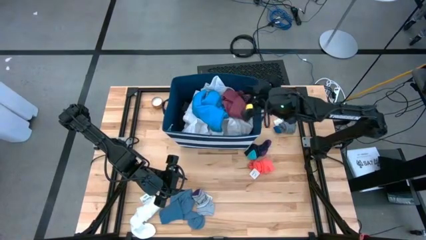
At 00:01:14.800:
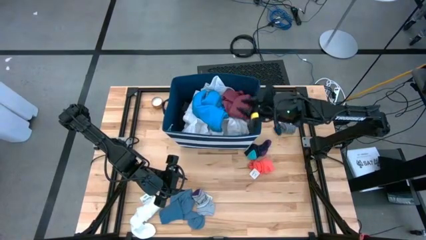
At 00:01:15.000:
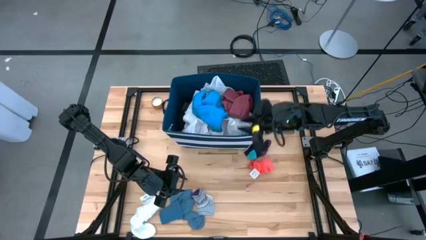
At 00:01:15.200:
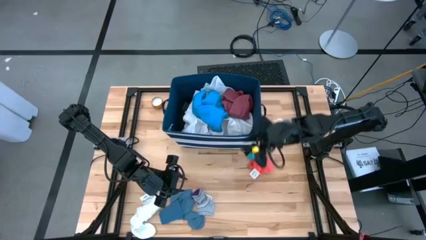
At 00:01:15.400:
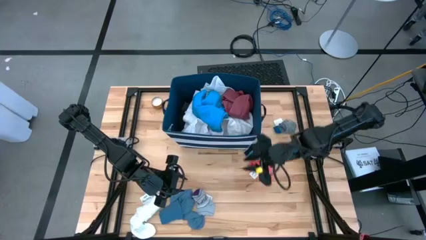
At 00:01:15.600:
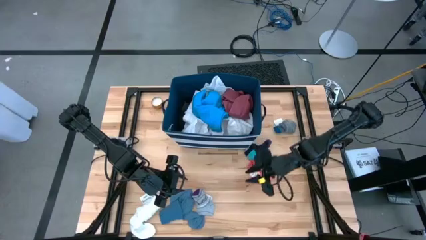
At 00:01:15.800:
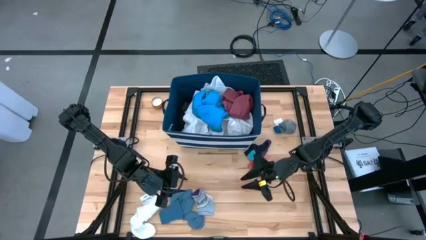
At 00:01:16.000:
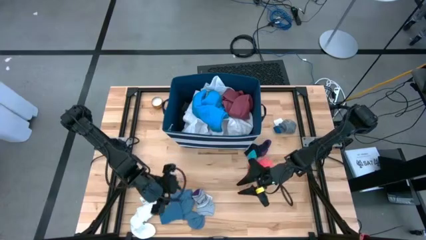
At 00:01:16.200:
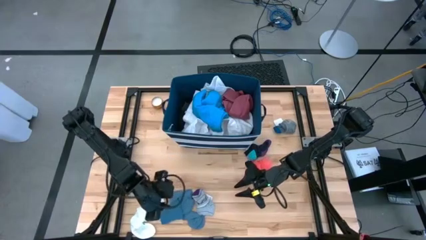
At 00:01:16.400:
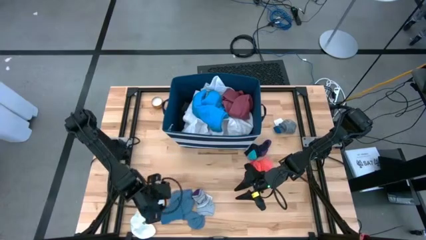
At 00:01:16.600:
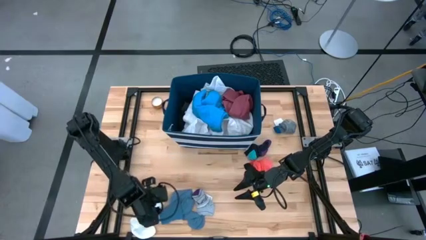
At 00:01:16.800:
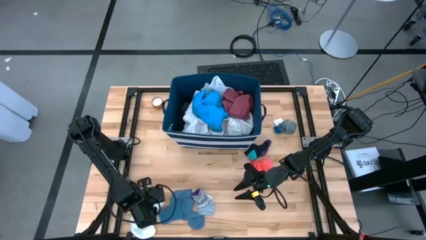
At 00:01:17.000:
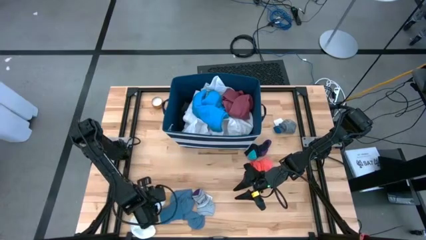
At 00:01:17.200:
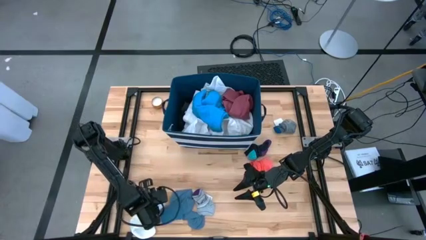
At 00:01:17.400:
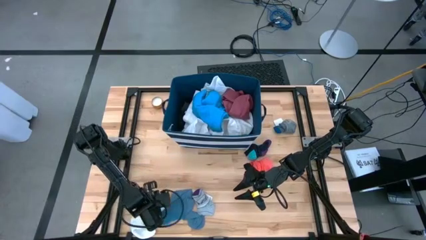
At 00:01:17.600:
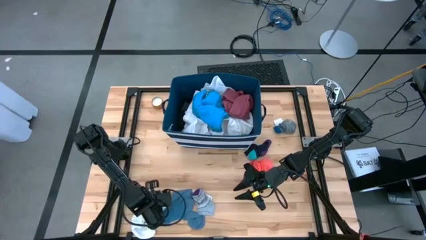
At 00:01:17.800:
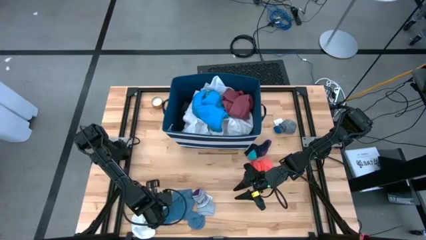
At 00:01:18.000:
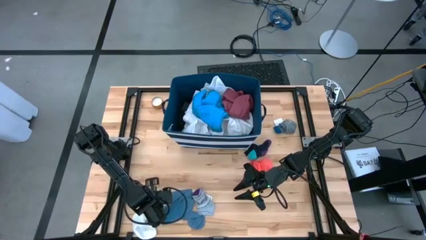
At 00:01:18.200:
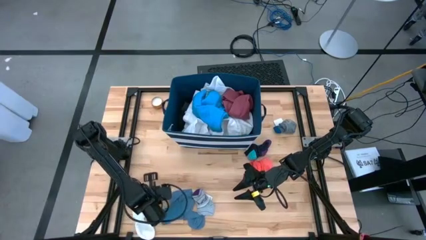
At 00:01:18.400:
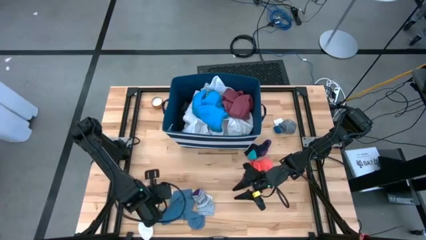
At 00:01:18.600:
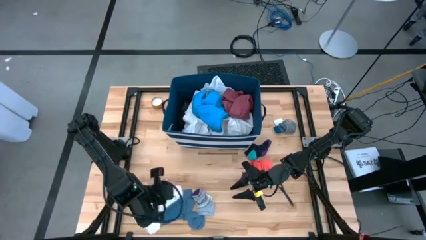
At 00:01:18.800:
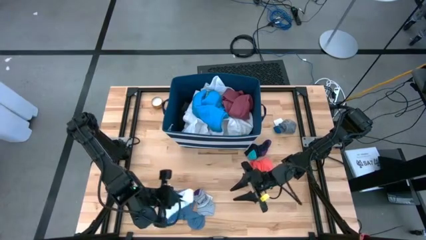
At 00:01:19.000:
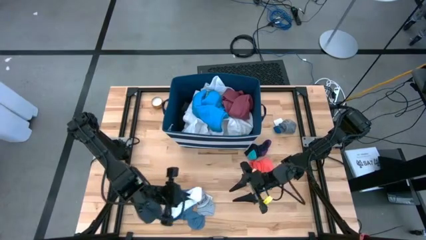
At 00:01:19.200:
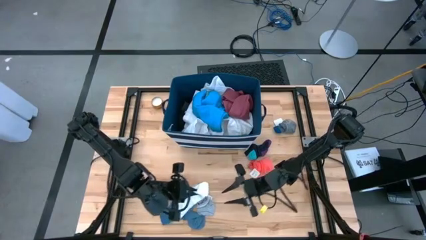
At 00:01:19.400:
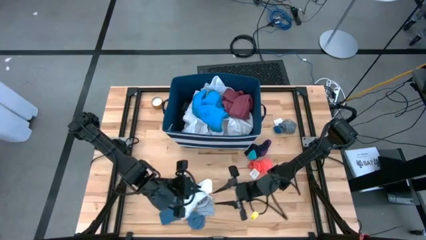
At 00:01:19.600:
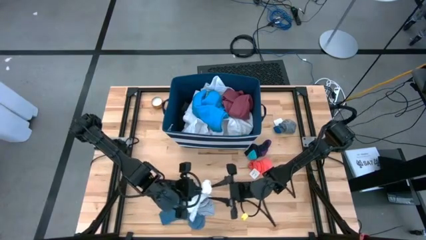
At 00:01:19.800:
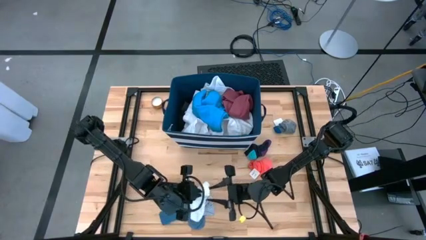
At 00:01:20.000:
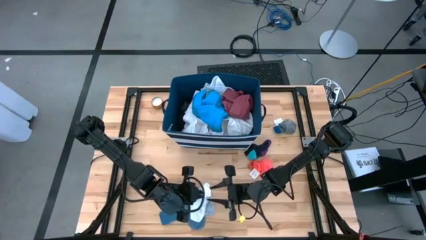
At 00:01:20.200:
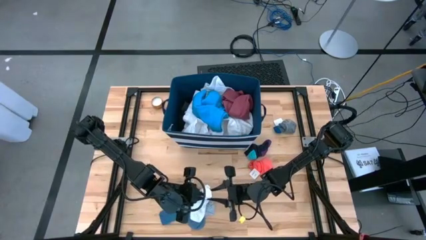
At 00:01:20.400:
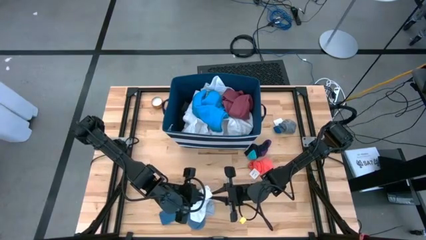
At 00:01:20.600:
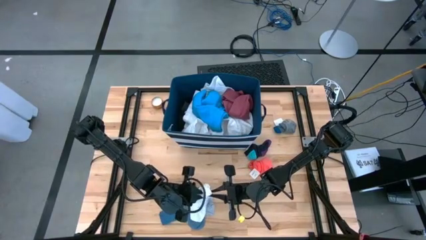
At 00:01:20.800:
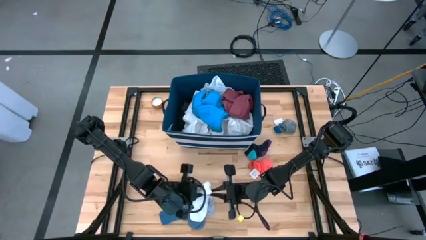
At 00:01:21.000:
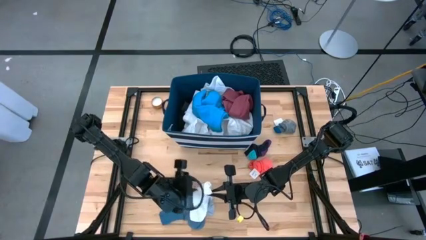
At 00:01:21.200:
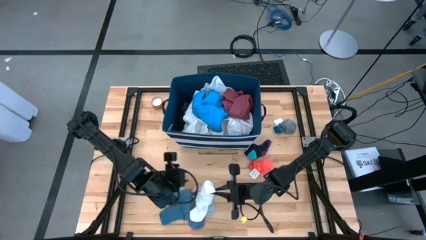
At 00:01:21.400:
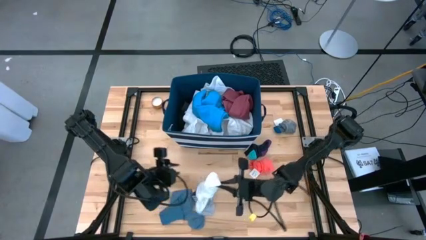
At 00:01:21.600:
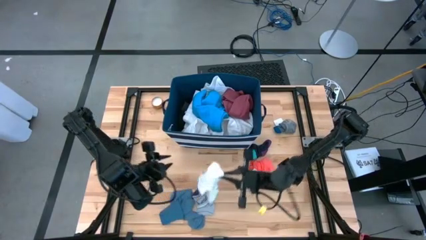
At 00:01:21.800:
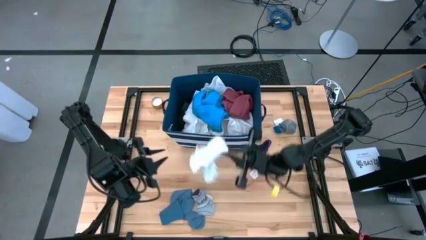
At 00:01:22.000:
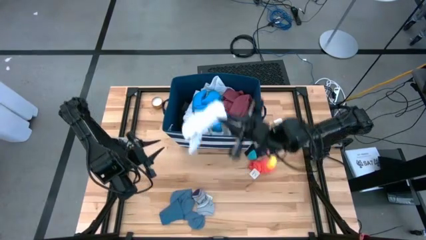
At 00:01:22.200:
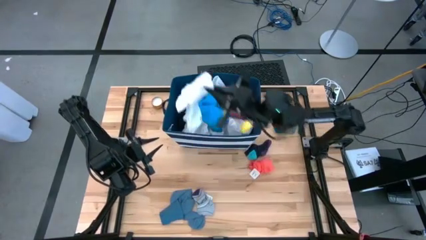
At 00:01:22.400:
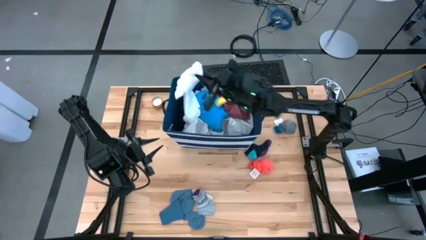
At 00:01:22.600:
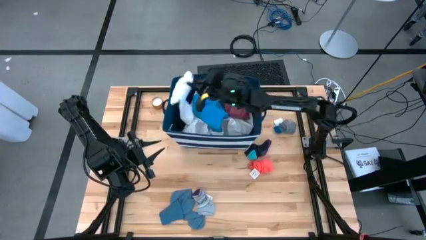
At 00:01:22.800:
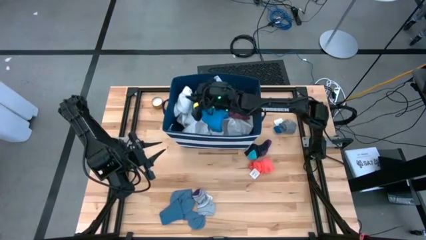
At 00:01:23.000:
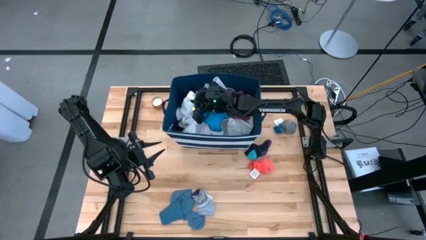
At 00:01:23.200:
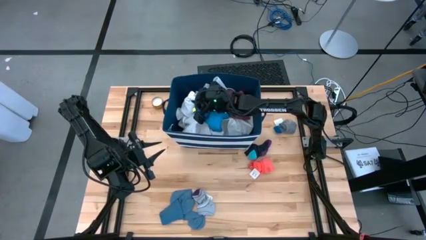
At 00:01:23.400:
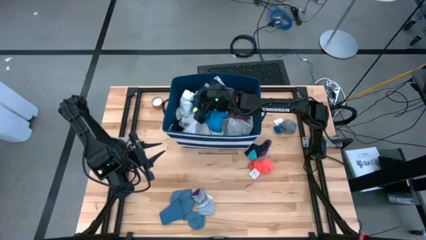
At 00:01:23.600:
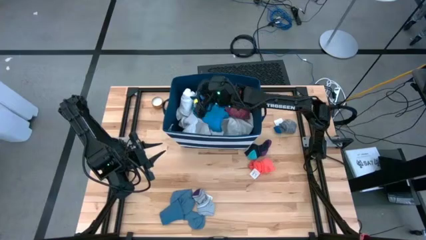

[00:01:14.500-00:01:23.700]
Task: Sort clothes
Put the white socks into the white and blue laundry organizer

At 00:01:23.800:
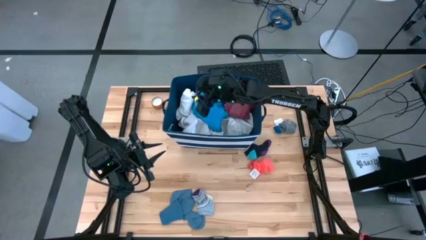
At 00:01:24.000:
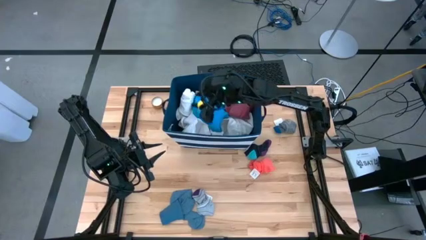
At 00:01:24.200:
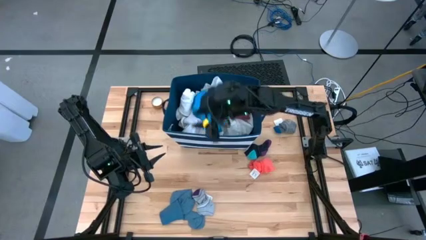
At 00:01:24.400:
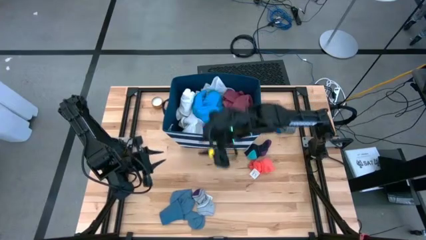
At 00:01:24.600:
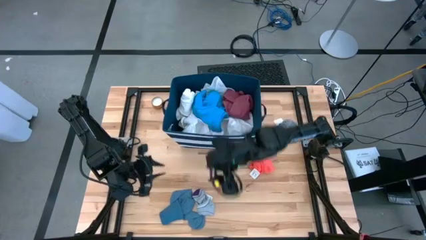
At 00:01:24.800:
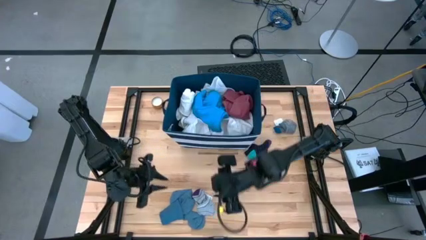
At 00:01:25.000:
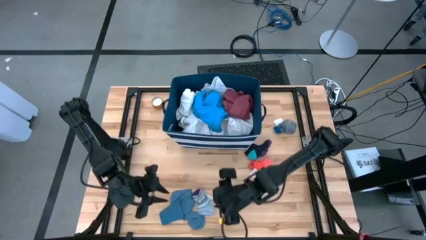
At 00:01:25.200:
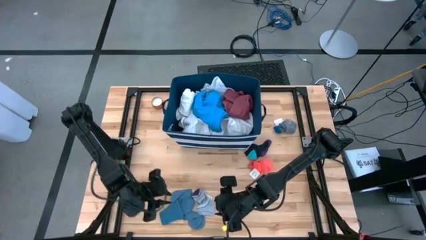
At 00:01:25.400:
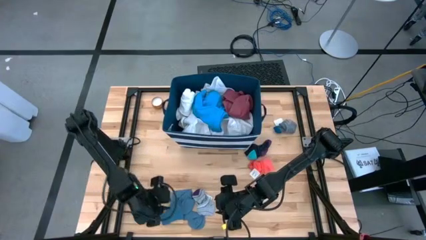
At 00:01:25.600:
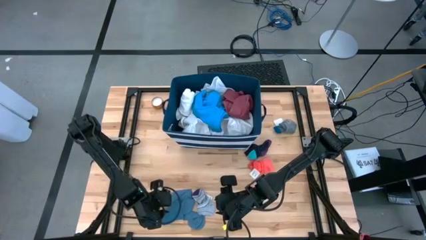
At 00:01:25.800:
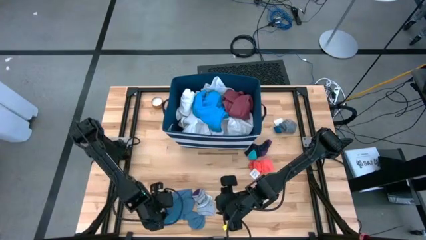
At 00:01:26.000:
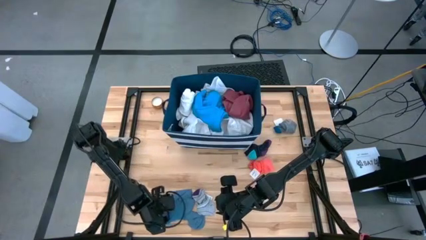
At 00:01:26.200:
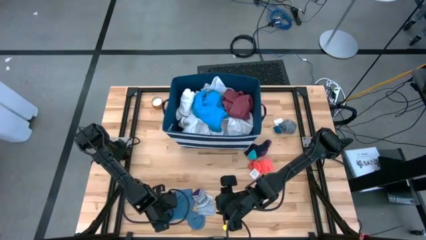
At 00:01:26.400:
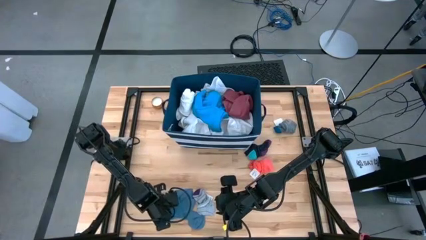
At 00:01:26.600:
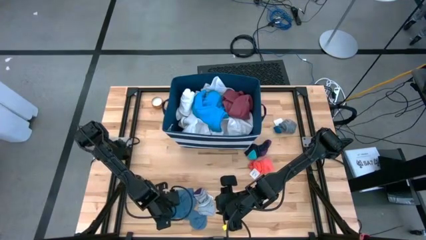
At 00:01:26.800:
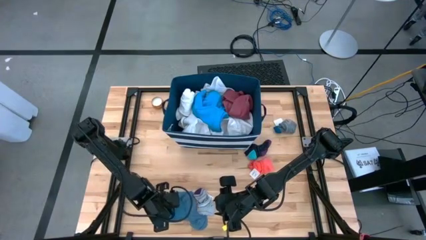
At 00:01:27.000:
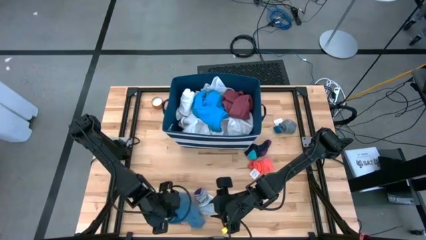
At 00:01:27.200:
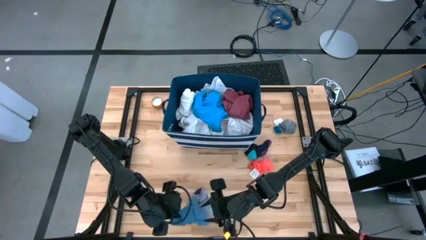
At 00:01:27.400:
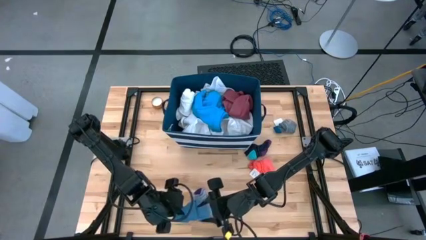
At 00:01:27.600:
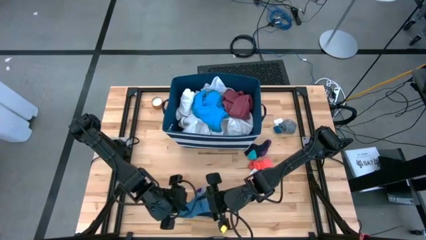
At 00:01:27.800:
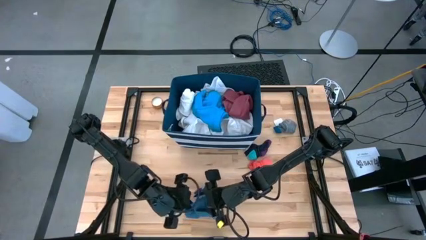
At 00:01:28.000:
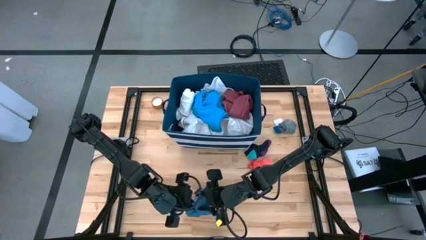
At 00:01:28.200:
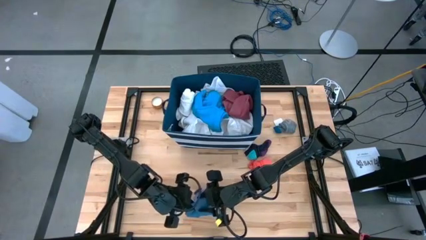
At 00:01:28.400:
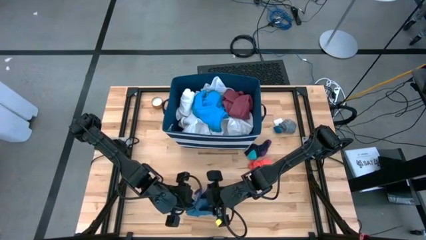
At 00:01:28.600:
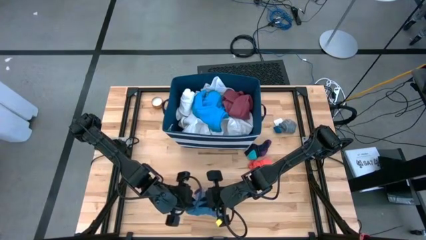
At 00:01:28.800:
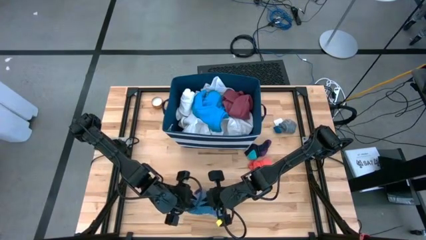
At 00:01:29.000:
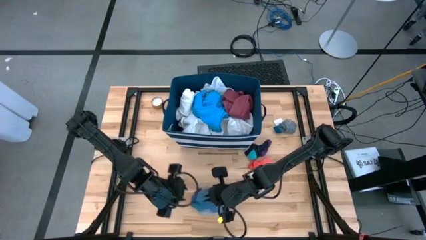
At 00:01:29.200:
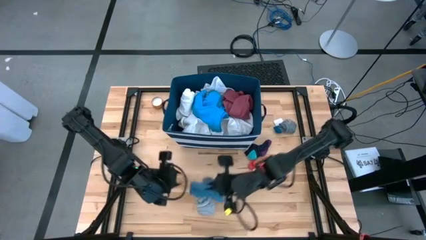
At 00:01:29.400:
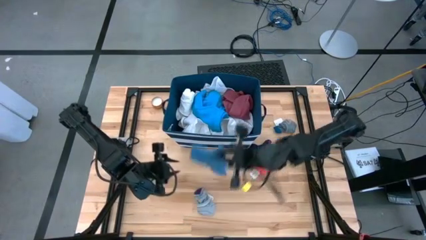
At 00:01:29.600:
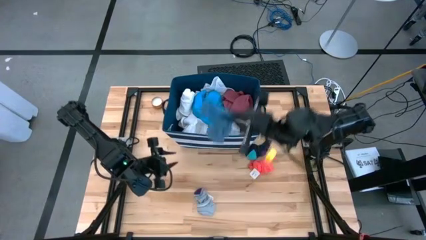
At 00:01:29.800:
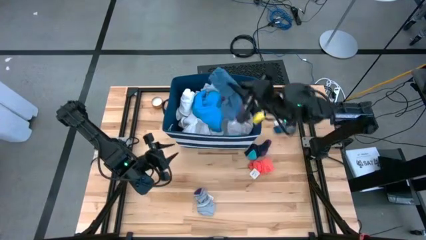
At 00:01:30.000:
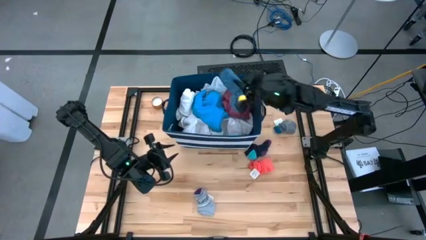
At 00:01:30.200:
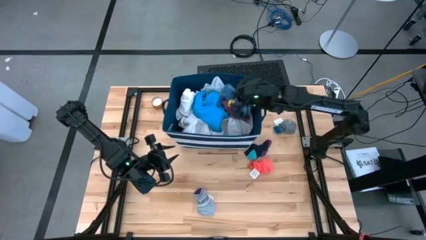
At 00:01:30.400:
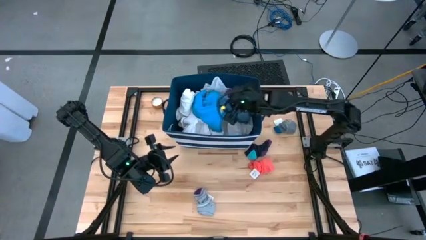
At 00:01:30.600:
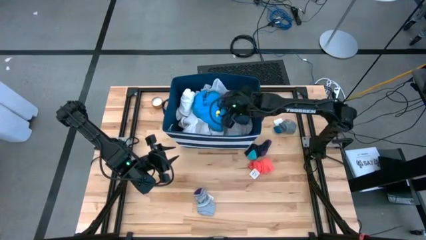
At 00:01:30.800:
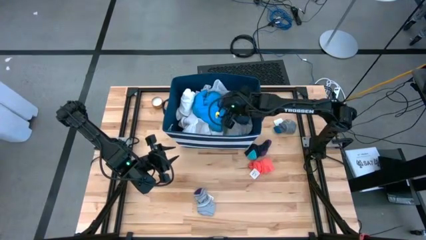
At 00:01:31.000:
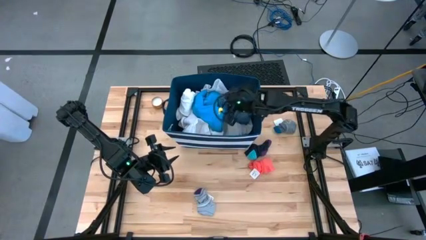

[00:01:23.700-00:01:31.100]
Put the blue socks into the white and blue laundry organizer
